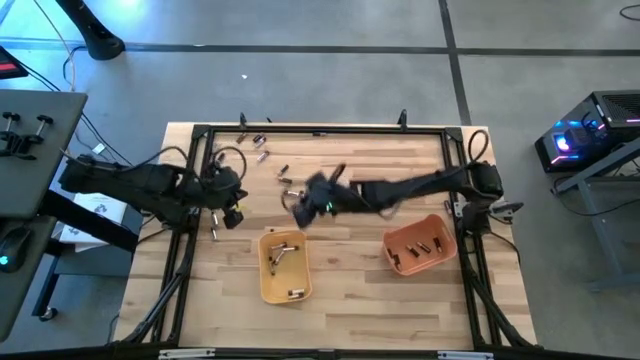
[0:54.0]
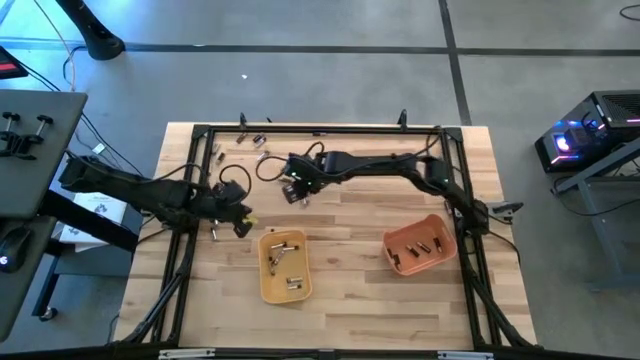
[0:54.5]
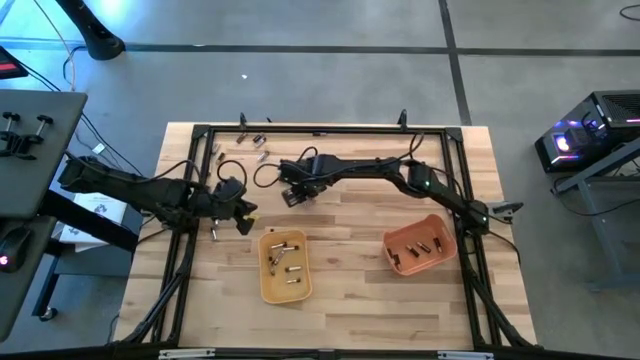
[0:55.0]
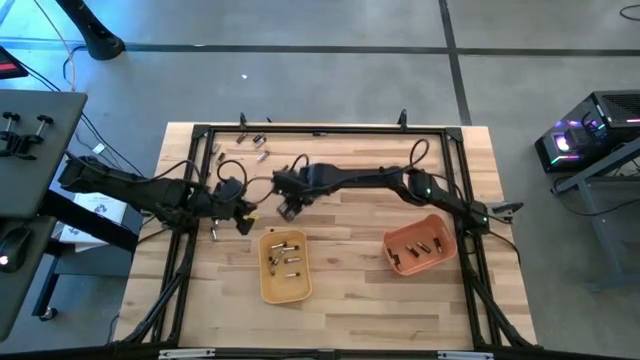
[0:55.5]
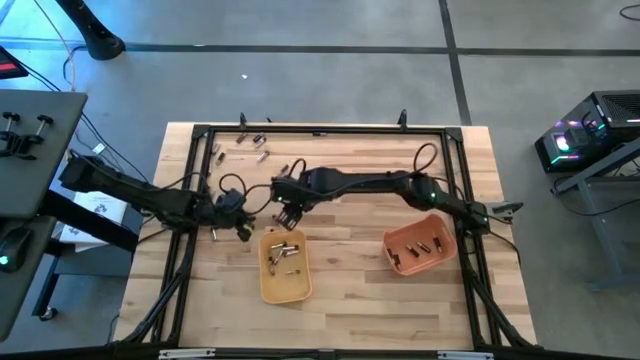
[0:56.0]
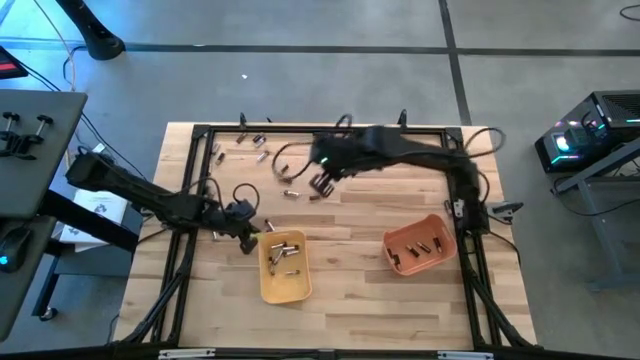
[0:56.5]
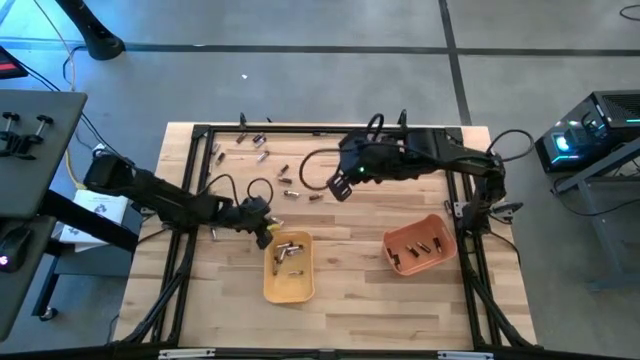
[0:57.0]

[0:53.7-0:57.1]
Task: Sort batteries
Put the silver battery into the yellow bin

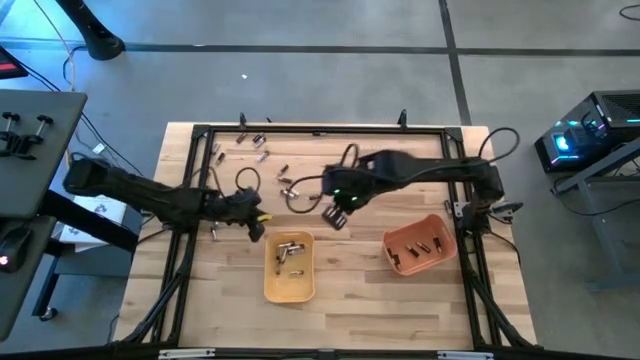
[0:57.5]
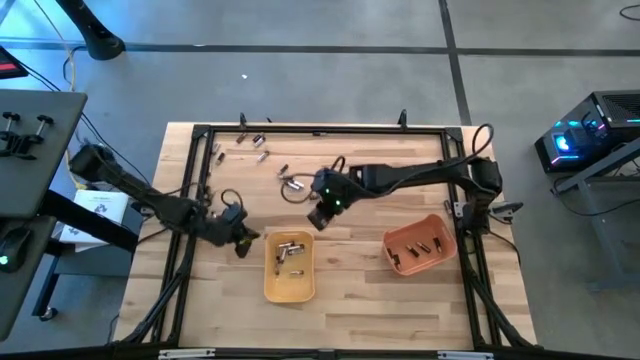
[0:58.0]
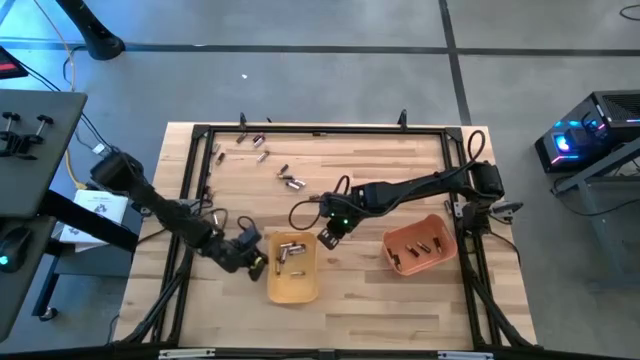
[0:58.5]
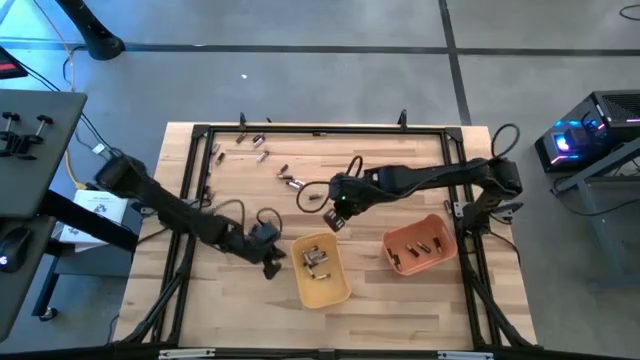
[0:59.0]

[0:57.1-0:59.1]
Move the yellow bin to the center of the table

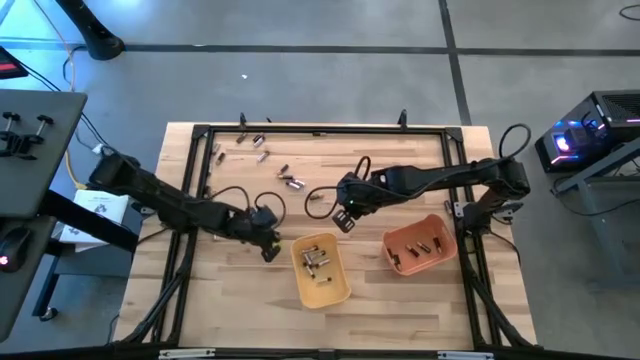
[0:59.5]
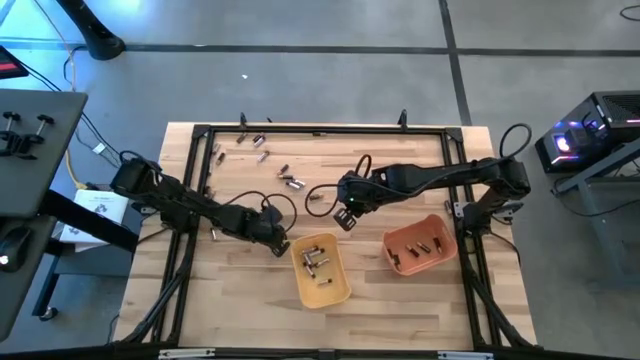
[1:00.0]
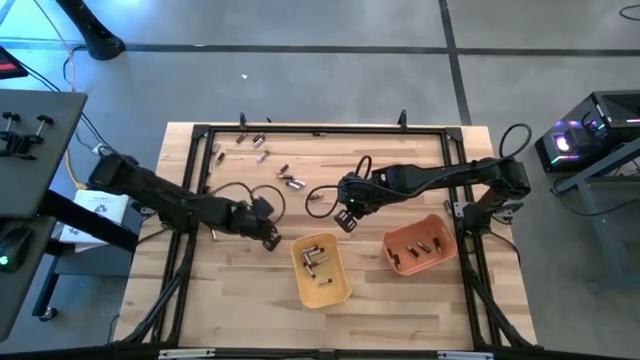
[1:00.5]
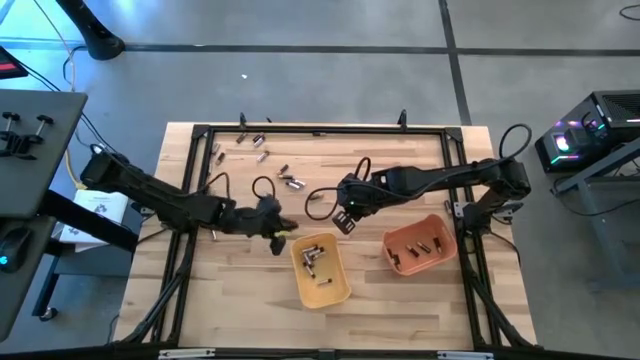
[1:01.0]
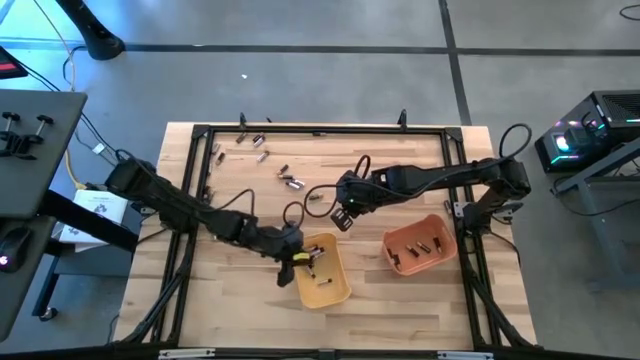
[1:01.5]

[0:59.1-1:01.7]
Put the silver battery into the yellow bin

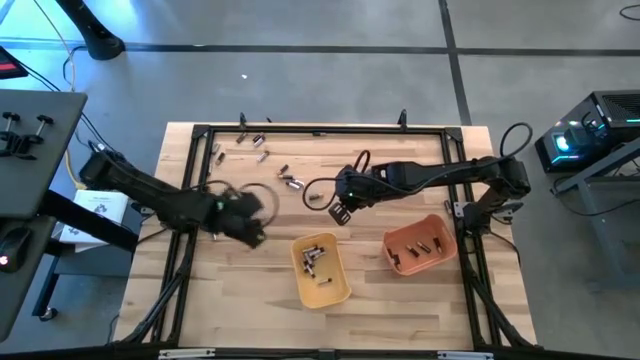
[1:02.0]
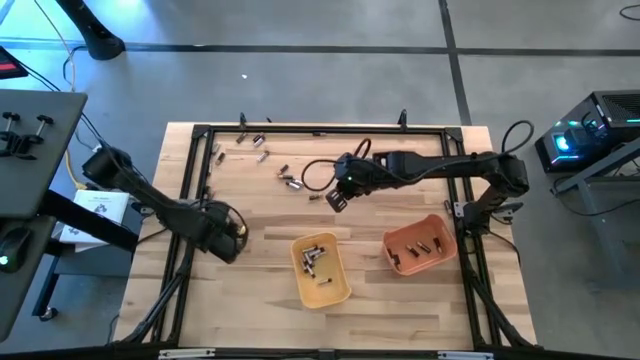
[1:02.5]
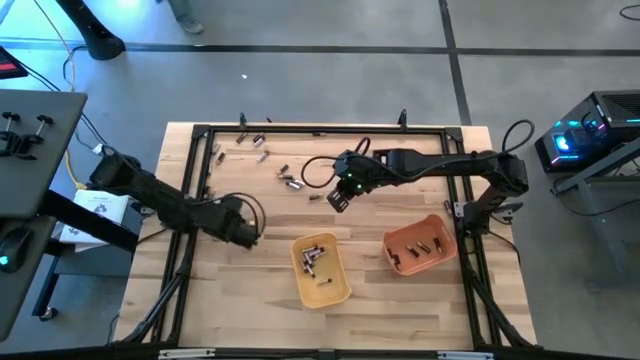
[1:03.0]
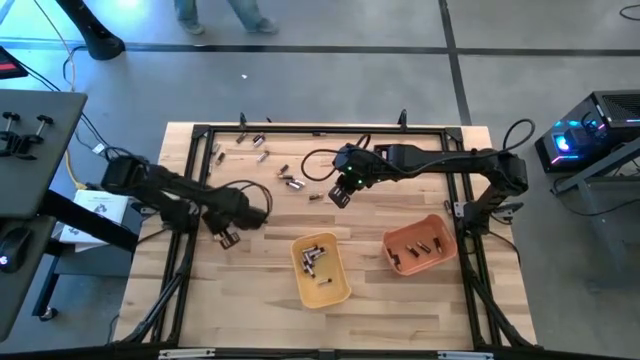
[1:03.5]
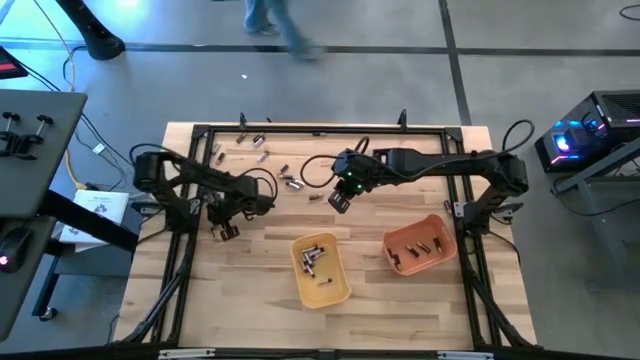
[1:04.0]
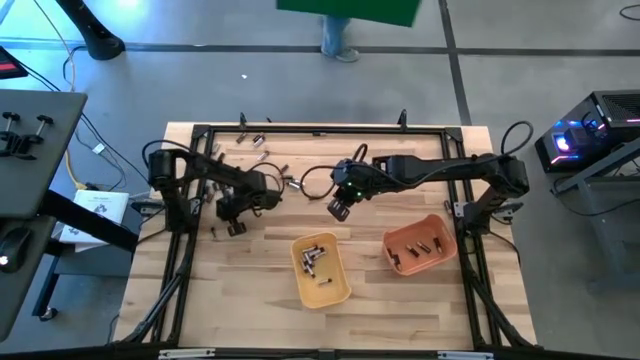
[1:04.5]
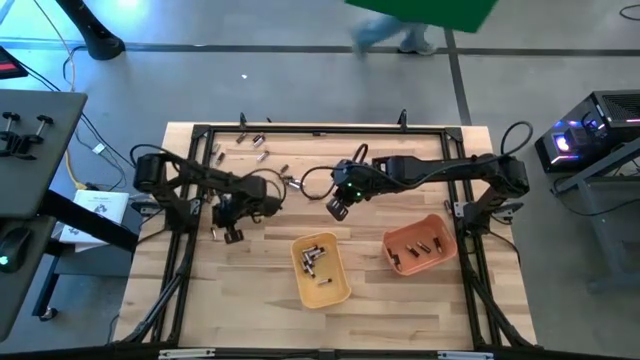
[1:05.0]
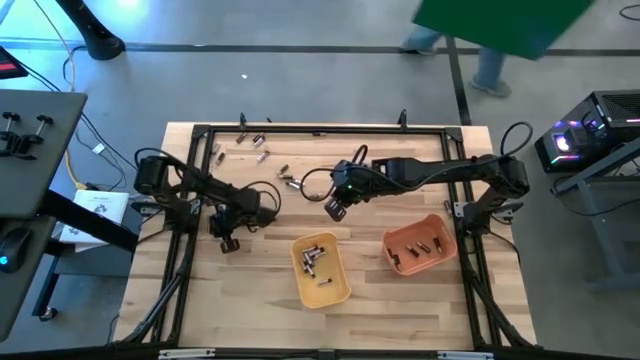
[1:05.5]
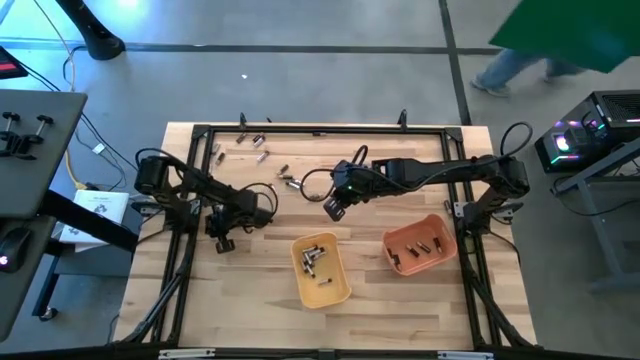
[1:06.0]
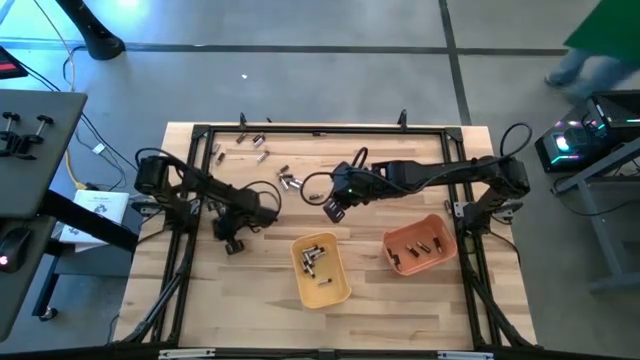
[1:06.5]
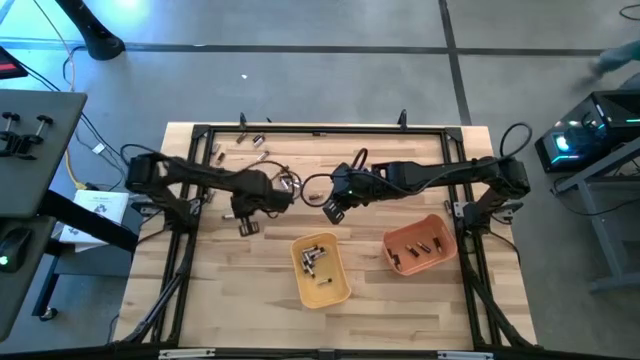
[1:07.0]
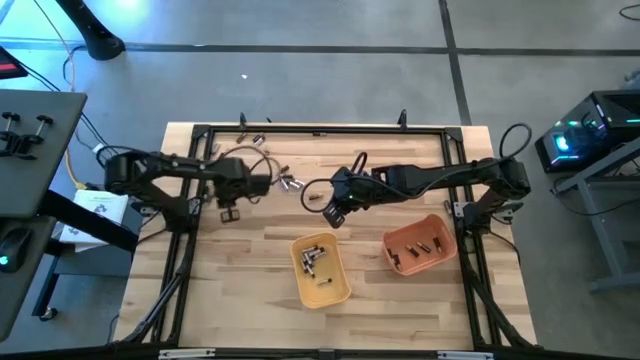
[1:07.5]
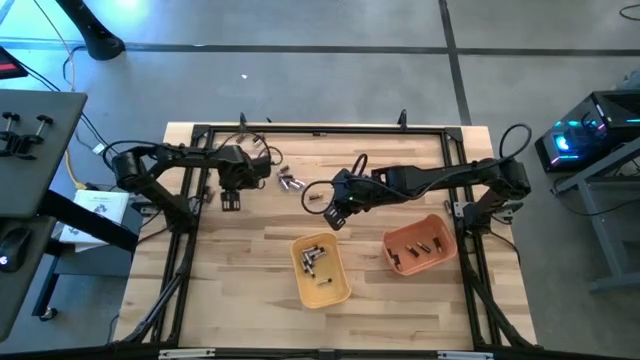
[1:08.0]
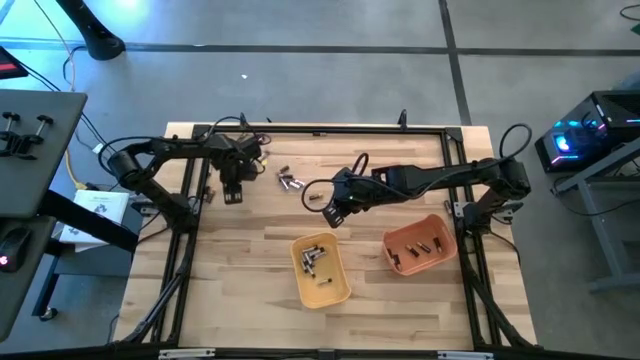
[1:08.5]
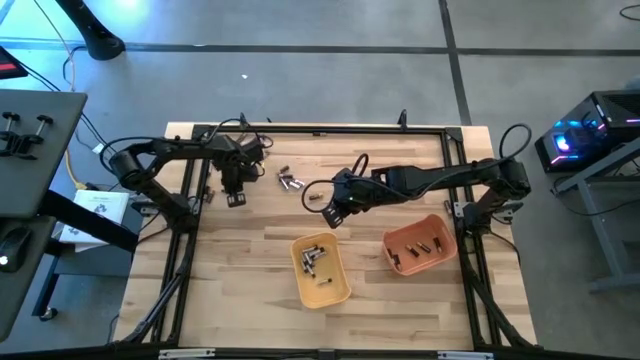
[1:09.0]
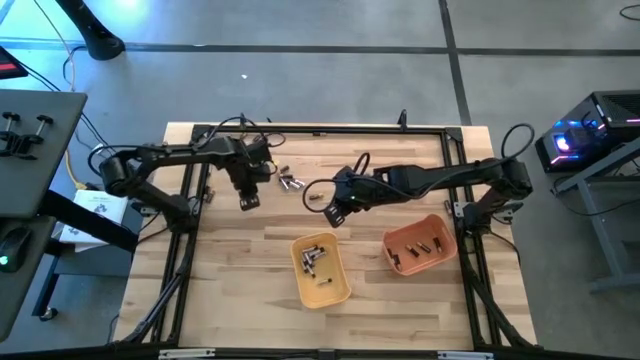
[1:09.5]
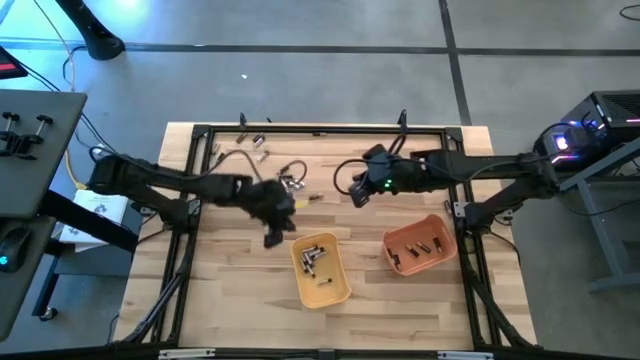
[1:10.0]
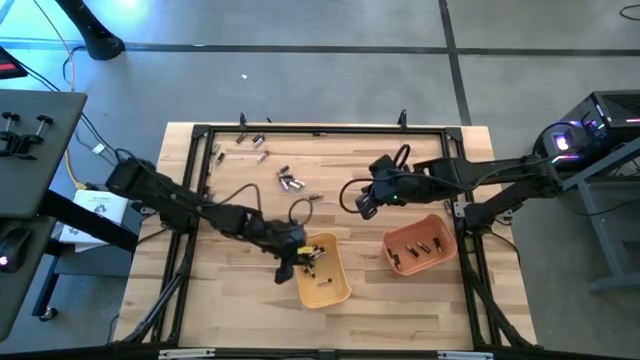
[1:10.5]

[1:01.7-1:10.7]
Put the silver battery into the yellow bin

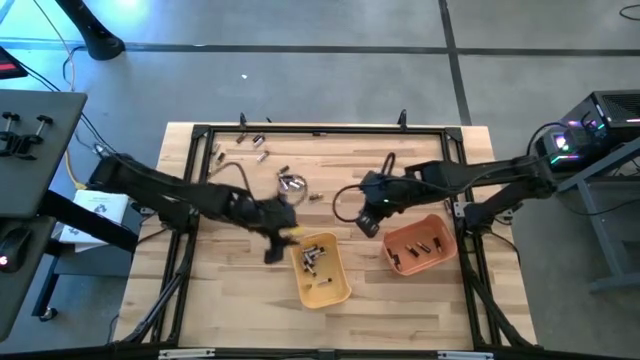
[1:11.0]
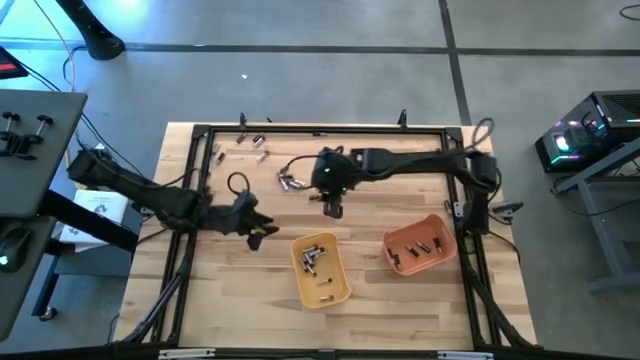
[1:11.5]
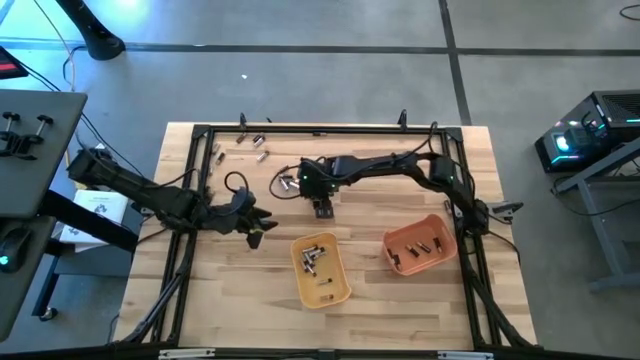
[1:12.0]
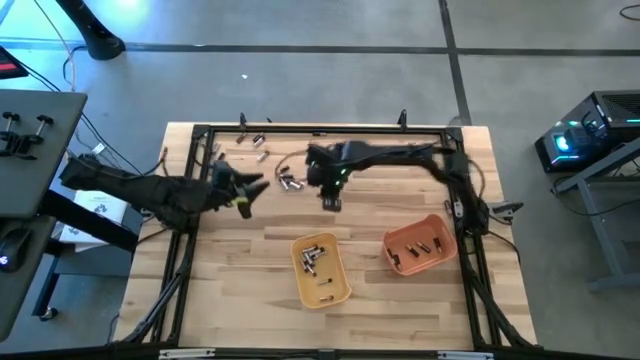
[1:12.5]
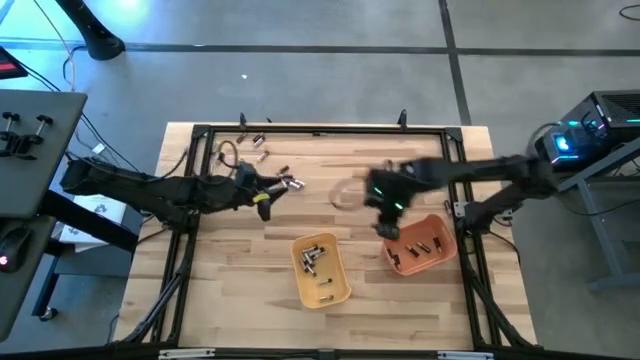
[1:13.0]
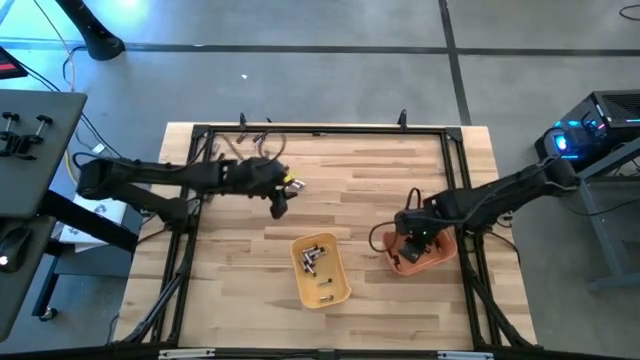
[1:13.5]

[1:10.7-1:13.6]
Put the black battery into the orange bin

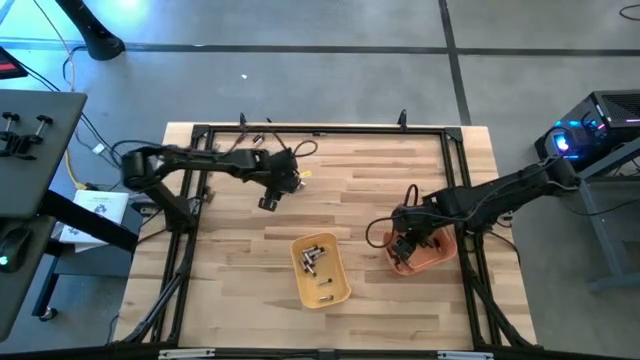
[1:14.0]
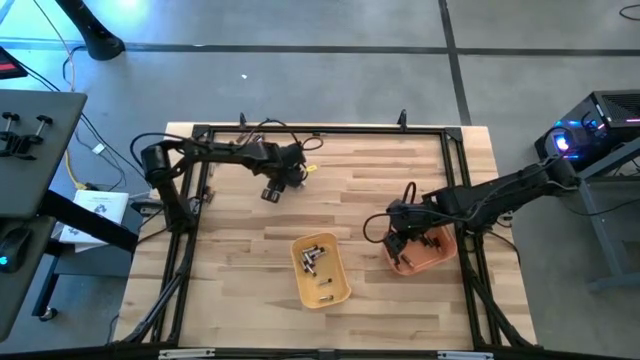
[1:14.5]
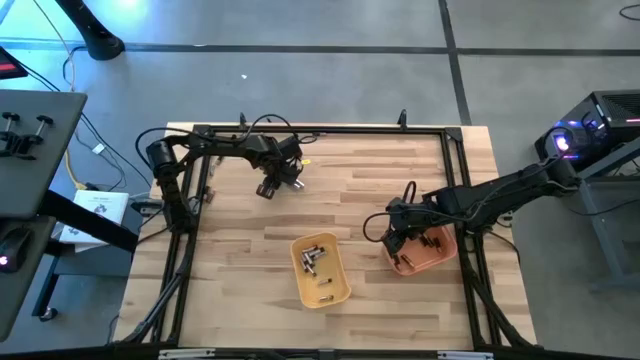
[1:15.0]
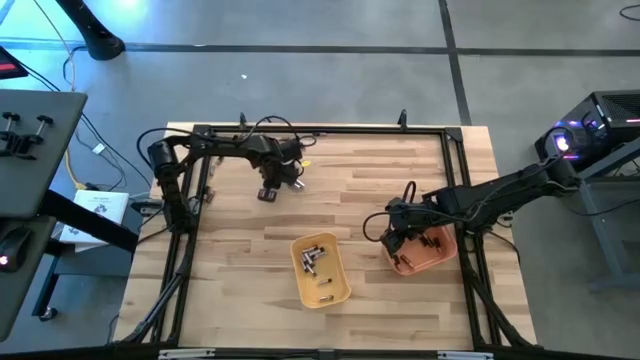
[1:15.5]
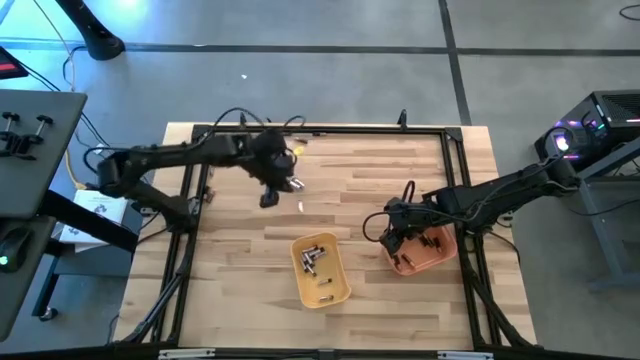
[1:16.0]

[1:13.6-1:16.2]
Put the silver battery into the yellow bin
